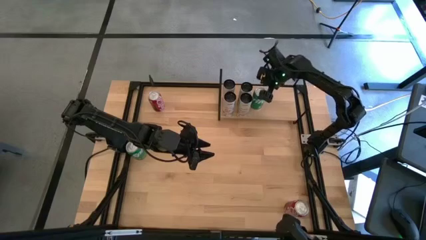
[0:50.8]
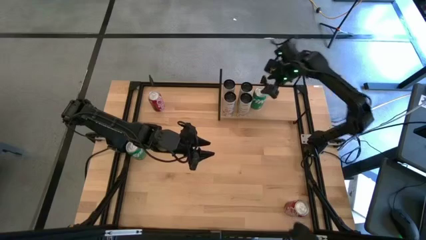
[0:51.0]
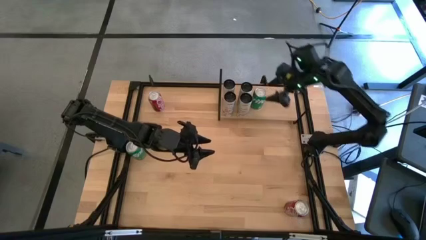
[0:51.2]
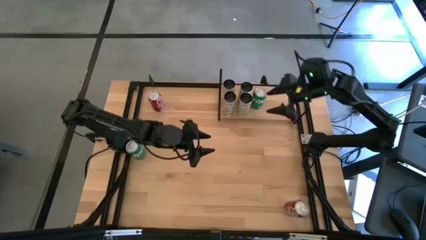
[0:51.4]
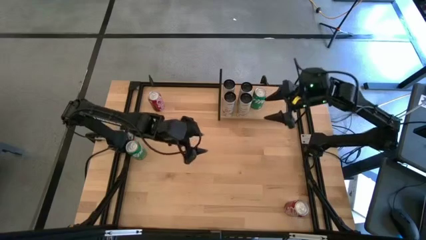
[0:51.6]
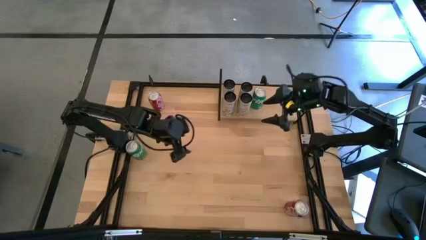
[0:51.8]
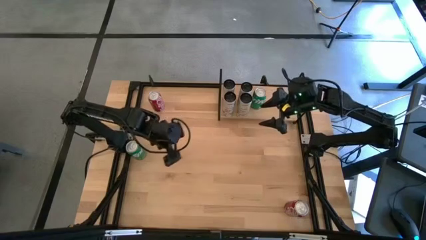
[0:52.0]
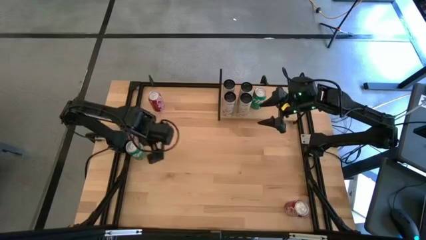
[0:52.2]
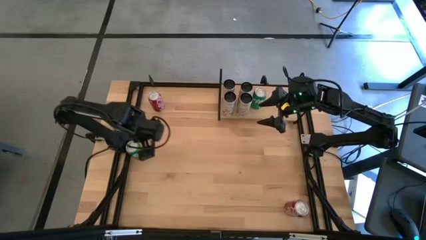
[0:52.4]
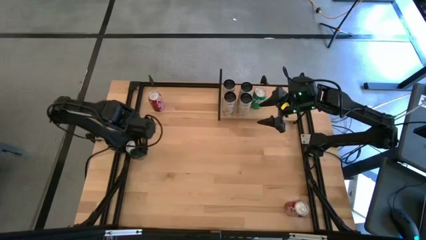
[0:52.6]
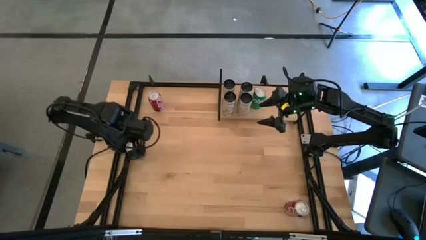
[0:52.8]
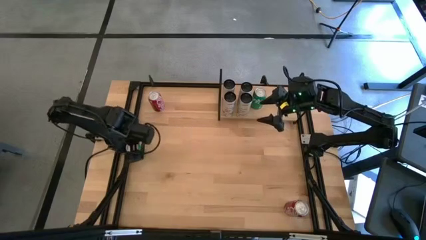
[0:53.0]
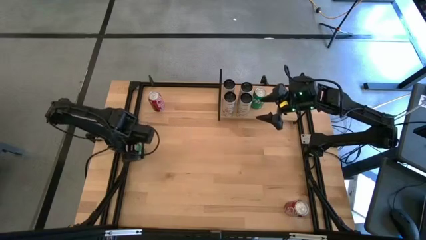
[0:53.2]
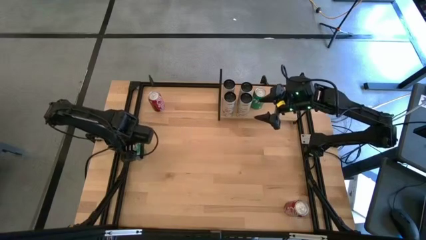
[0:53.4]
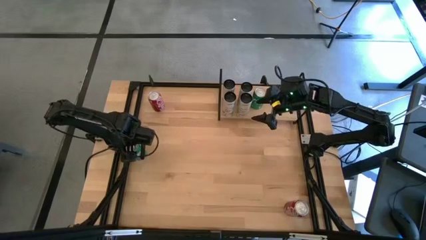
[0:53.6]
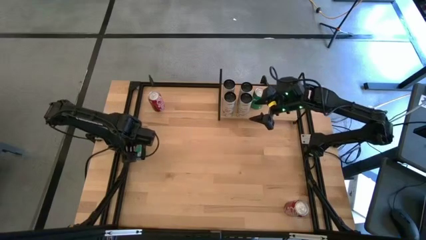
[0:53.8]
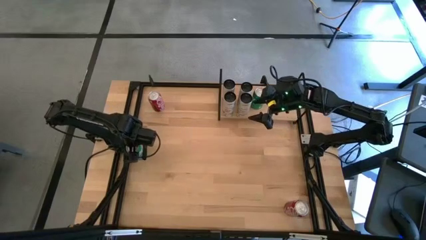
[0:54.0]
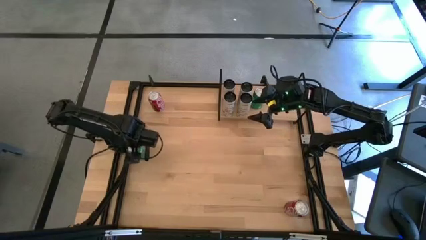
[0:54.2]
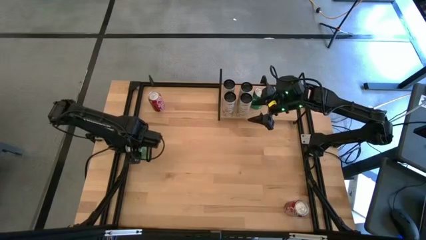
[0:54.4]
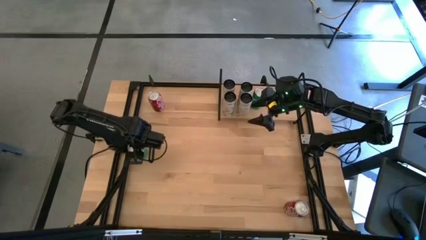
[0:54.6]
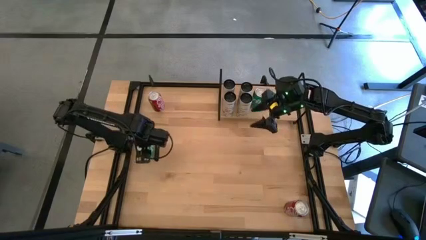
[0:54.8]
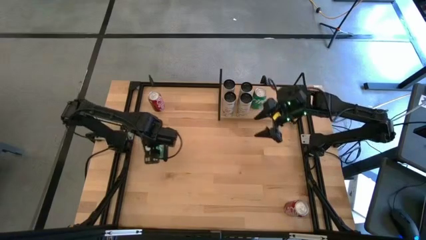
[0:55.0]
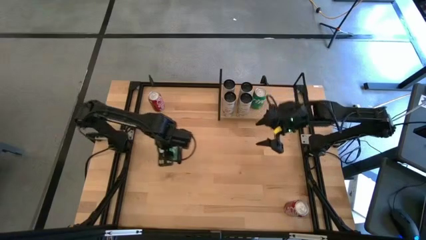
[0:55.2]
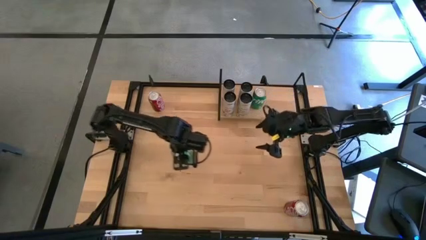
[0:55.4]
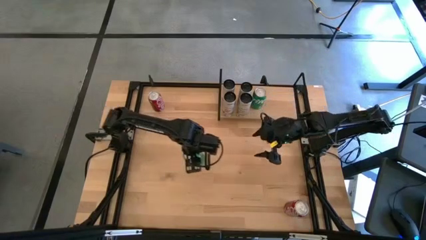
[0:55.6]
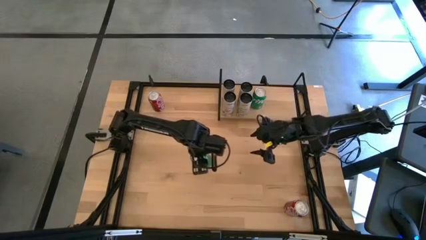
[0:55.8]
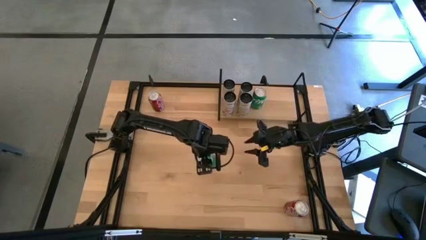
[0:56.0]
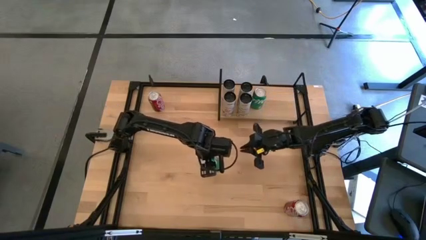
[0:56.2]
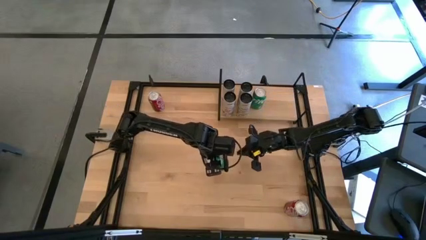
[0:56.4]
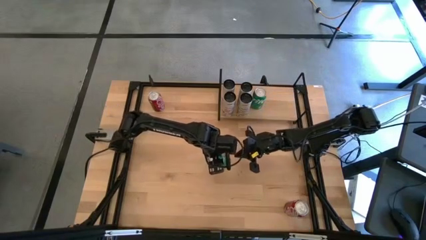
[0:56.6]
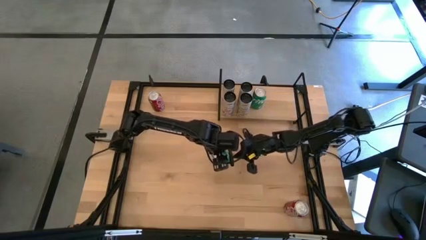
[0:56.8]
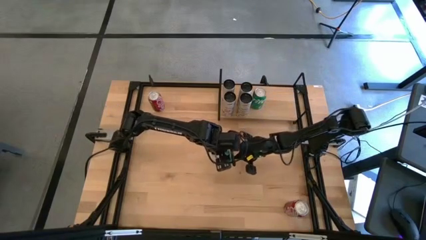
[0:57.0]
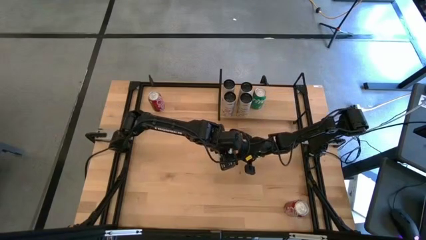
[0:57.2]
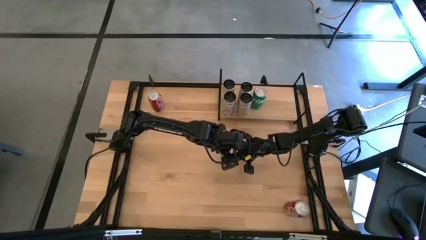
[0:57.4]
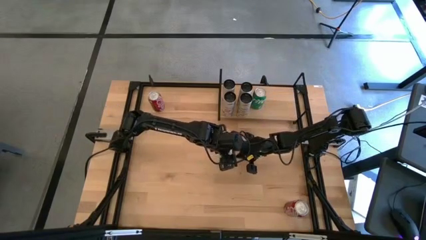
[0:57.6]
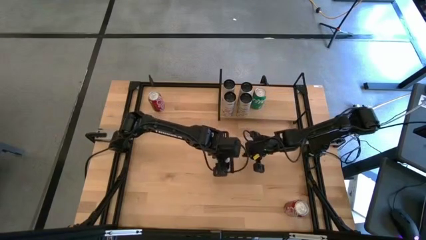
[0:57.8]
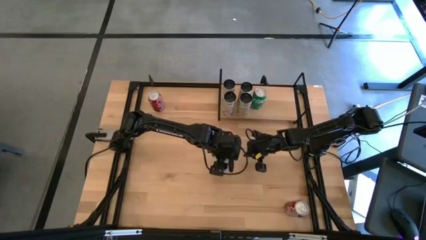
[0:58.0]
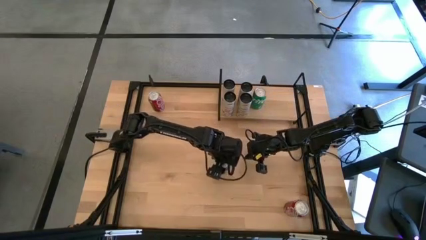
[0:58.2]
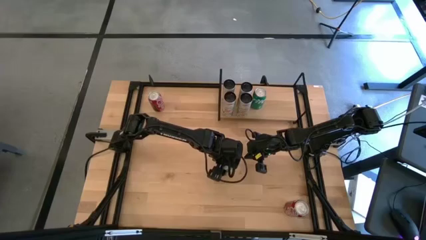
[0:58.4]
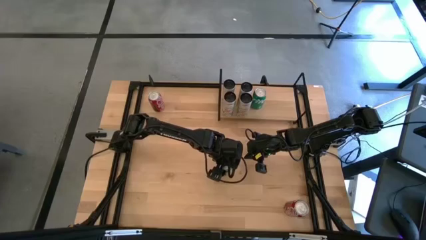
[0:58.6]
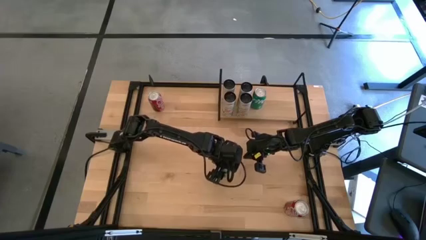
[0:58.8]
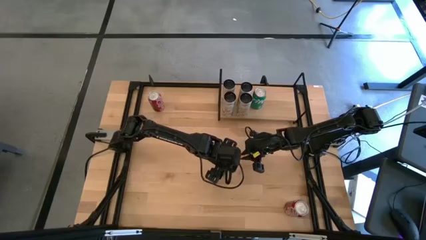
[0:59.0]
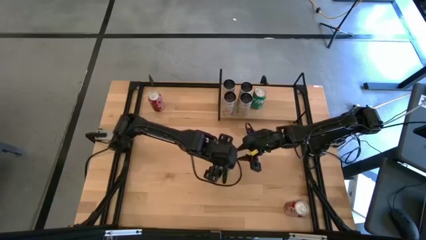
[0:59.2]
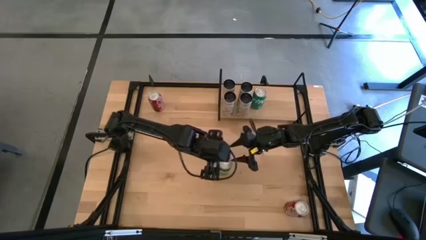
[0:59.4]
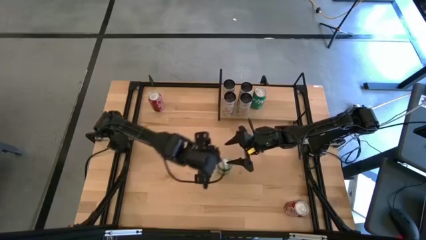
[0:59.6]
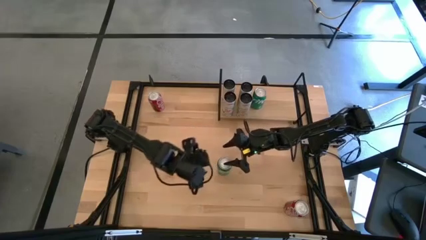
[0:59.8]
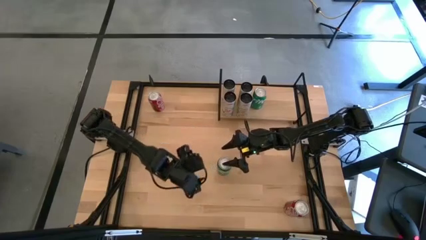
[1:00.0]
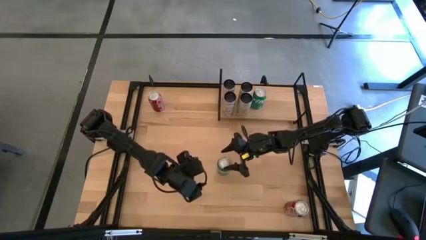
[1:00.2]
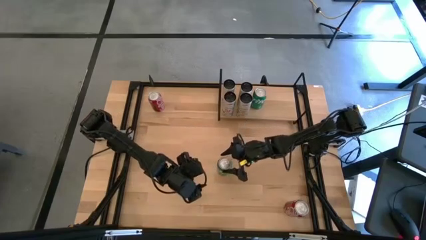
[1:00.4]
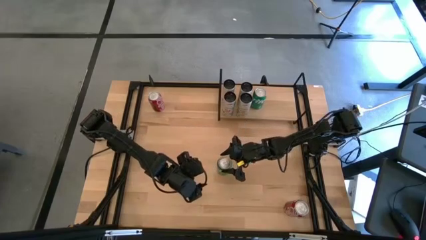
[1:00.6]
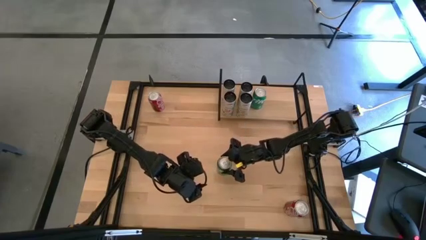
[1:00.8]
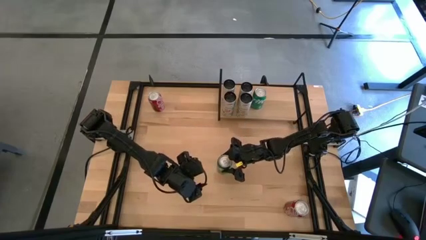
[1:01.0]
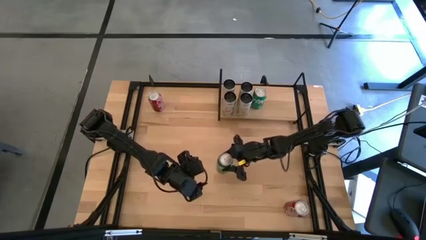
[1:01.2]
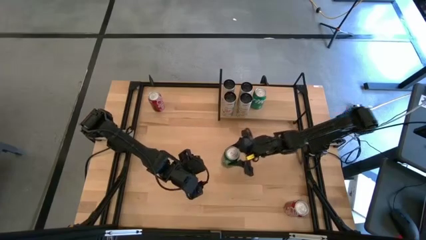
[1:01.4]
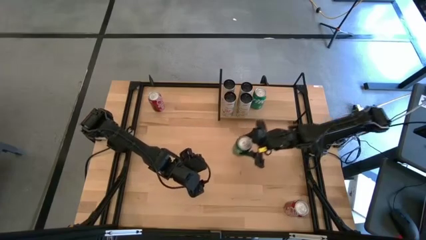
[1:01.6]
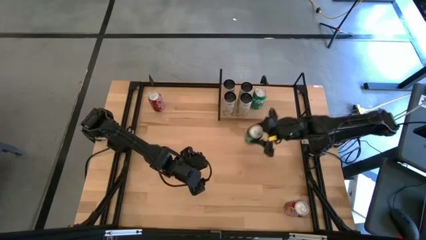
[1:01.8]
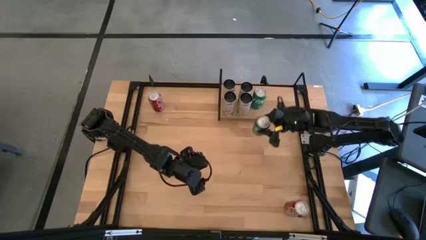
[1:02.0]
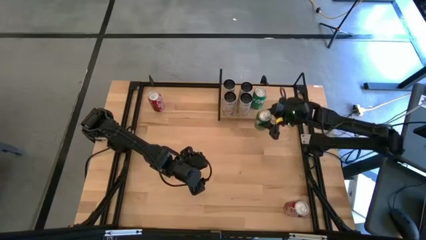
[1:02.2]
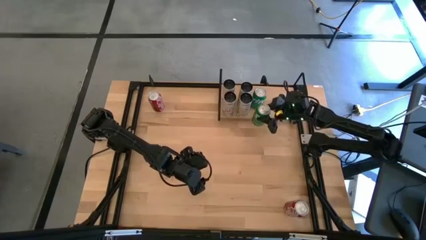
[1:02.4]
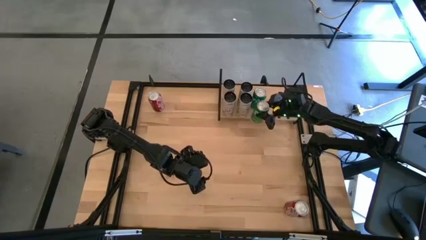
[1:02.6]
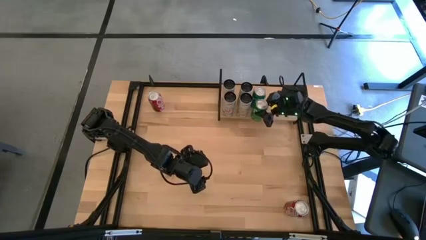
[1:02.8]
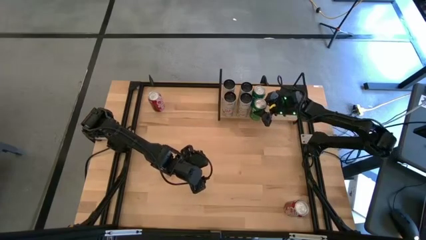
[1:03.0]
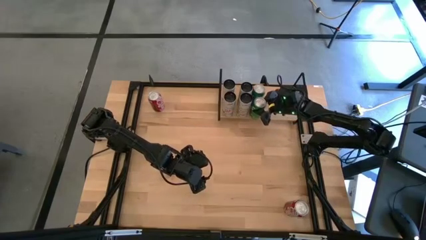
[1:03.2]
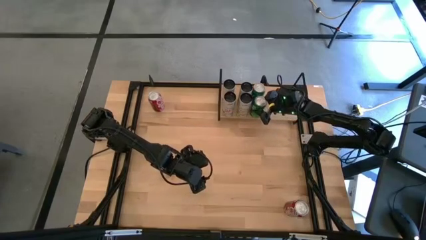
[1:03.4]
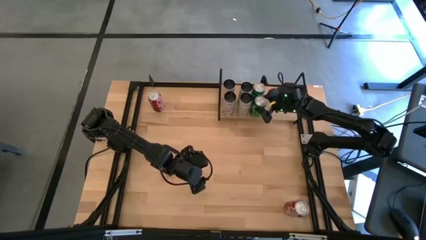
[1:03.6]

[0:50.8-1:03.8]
Task: Place canned beverage on shelf
Put the green soda can on the shelf aligned with the other green soda can

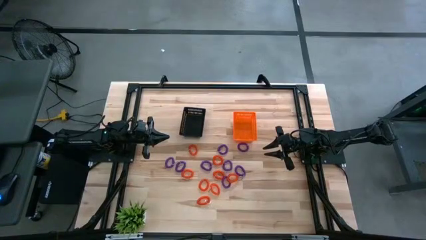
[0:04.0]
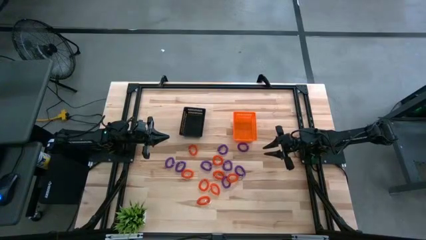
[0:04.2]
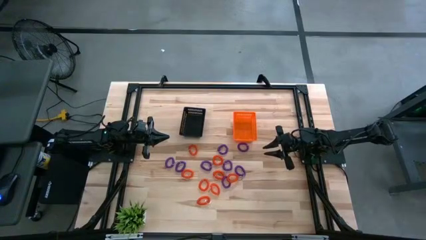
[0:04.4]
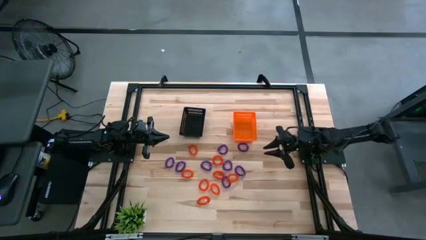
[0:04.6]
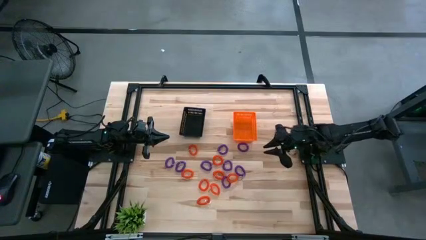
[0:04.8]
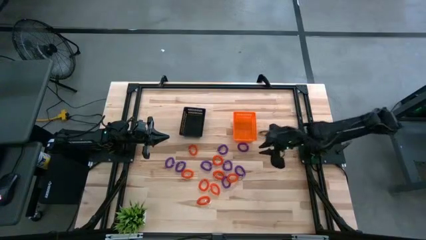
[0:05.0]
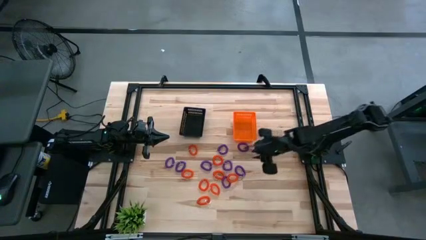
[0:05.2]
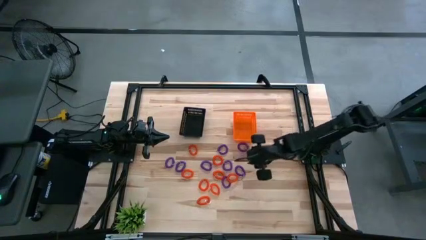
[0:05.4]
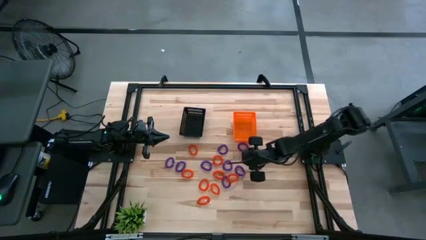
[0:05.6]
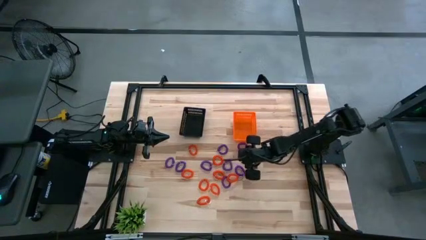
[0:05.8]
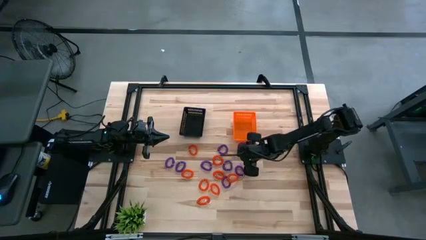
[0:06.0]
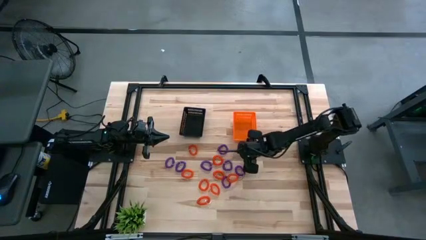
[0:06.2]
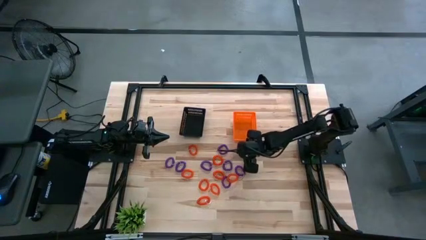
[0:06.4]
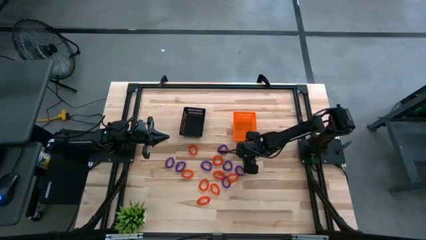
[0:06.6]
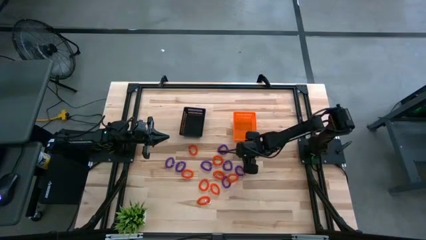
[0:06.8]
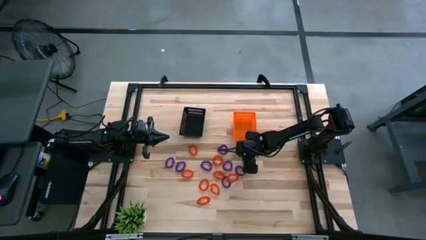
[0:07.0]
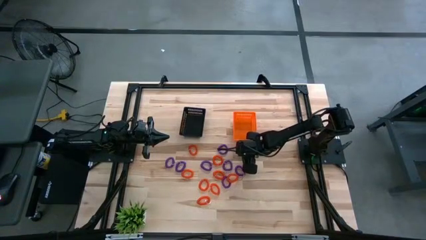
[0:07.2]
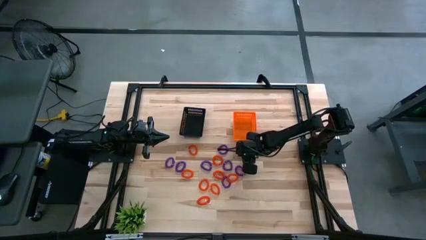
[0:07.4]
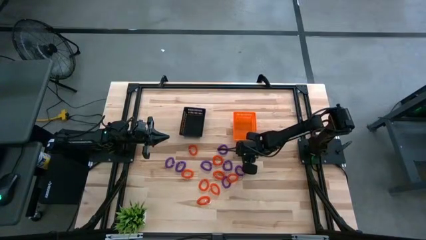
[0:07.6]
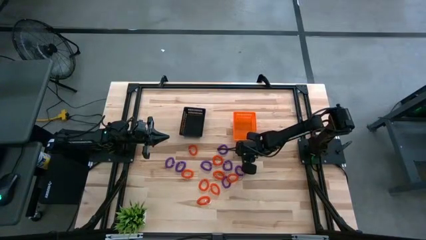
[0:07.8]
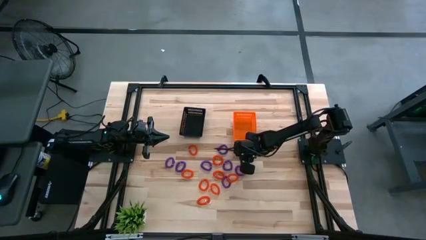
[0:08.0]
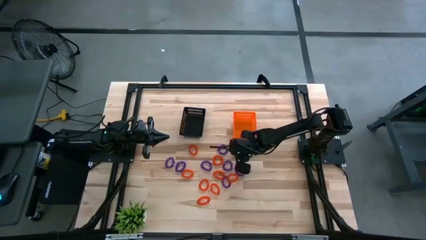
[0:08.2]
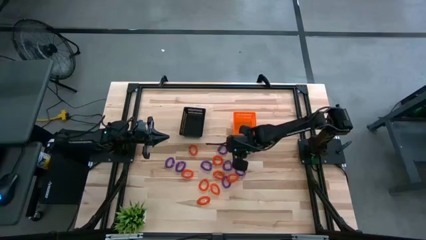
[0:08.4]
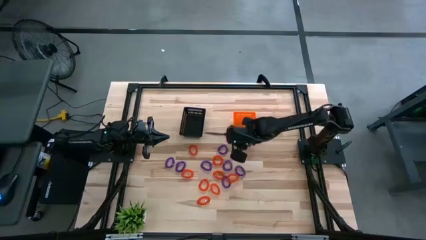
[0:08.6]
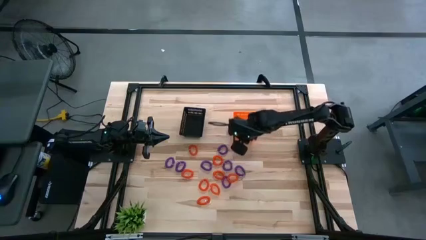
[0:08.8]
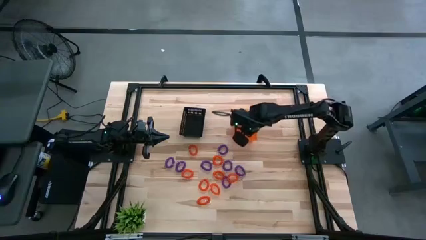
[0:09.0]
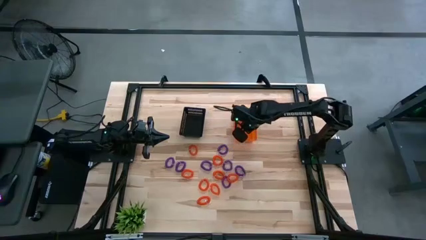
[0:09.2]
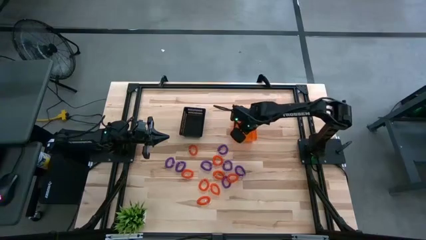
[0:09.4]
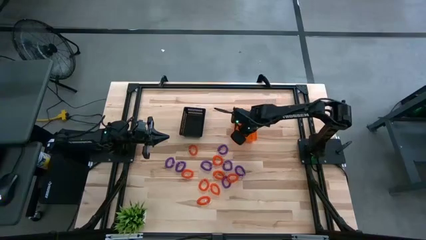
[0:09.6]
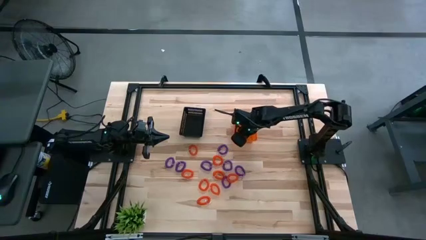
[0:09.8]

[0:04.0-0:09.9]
Task: Sort spring keychains into baskets
Put the violet spring keychain into the orange basket
